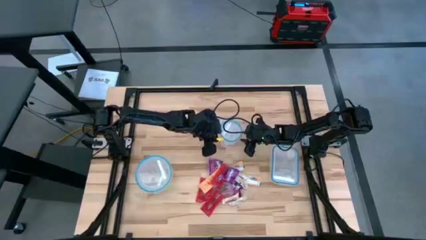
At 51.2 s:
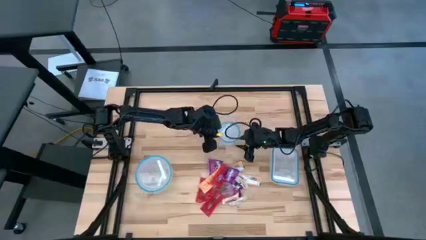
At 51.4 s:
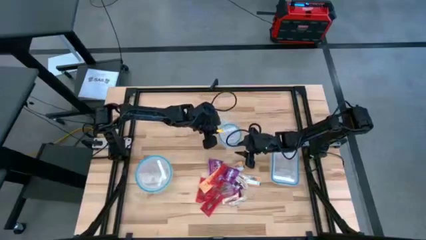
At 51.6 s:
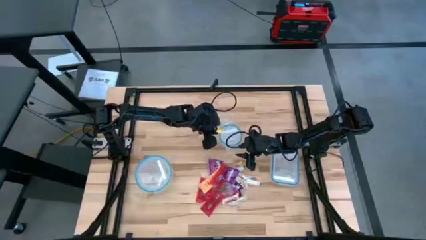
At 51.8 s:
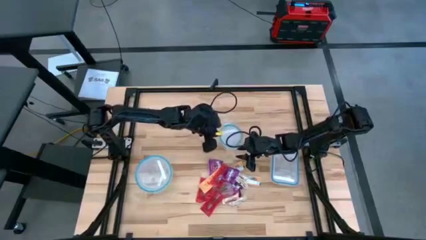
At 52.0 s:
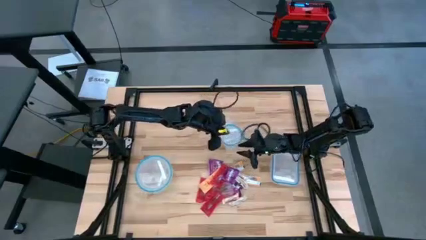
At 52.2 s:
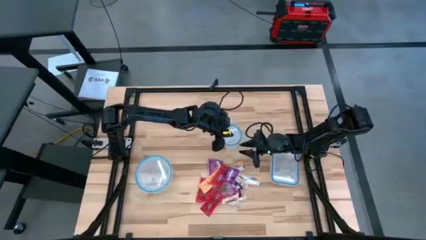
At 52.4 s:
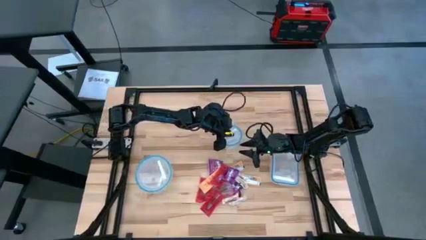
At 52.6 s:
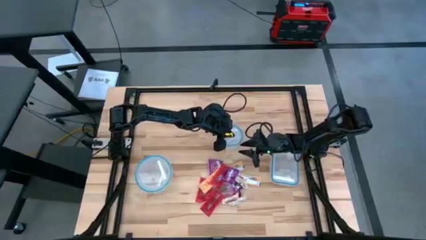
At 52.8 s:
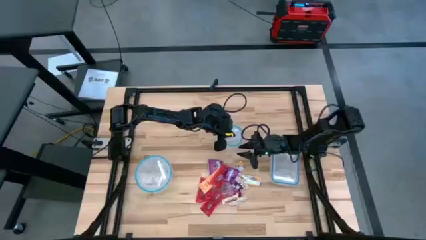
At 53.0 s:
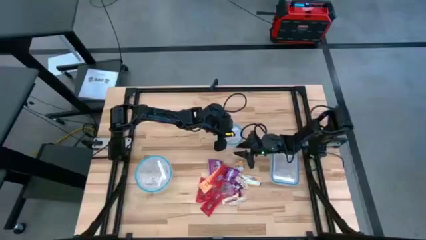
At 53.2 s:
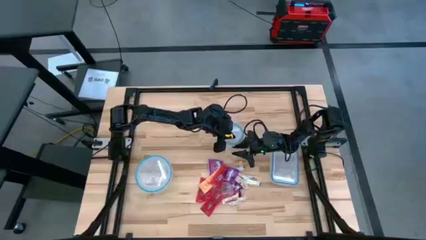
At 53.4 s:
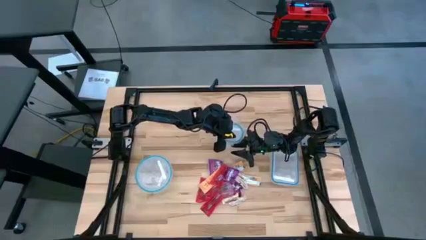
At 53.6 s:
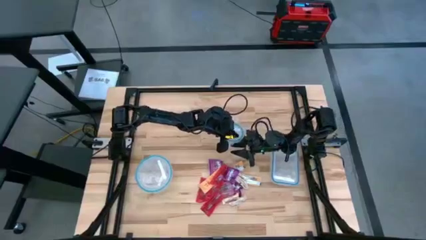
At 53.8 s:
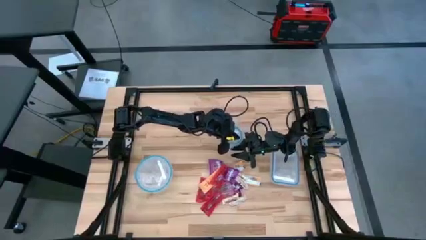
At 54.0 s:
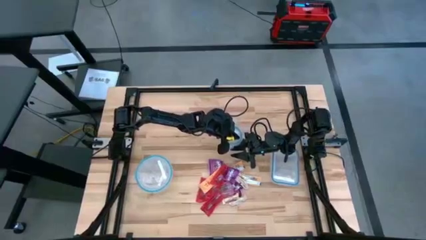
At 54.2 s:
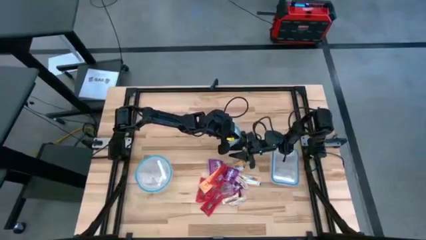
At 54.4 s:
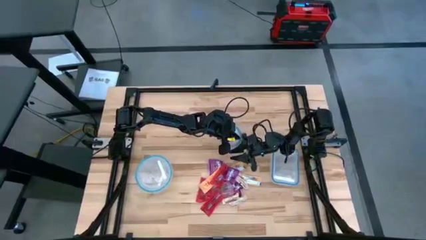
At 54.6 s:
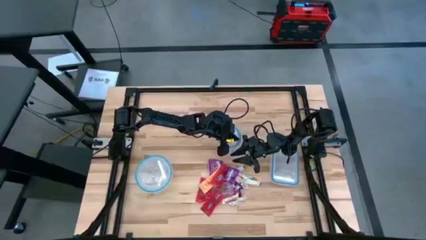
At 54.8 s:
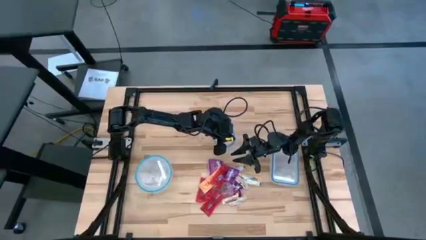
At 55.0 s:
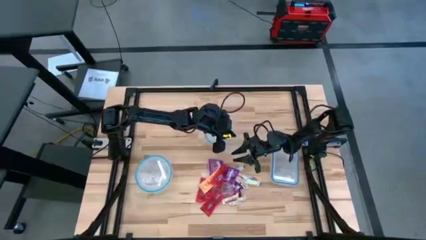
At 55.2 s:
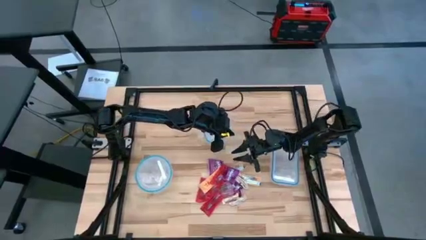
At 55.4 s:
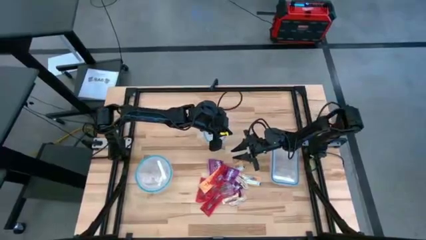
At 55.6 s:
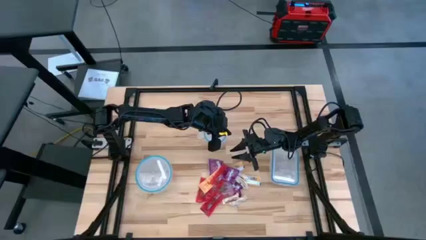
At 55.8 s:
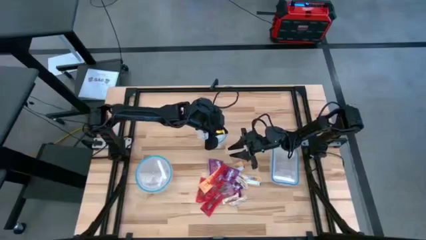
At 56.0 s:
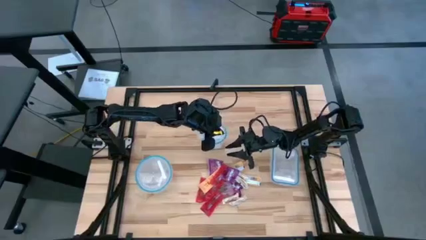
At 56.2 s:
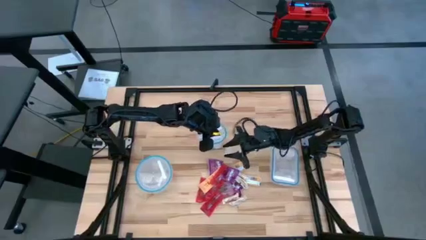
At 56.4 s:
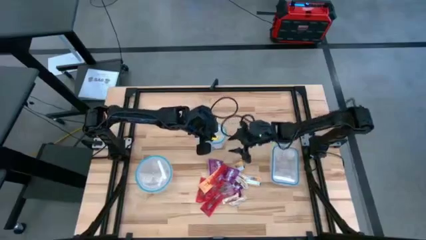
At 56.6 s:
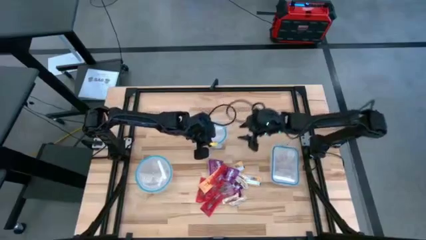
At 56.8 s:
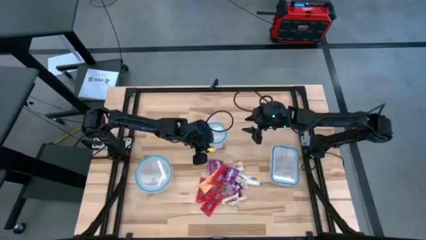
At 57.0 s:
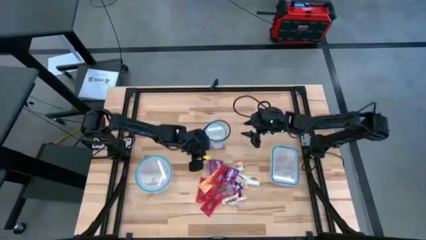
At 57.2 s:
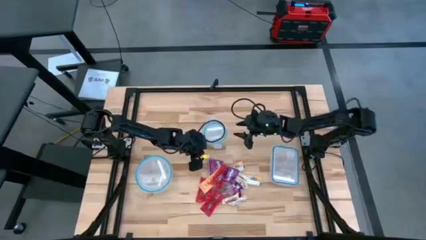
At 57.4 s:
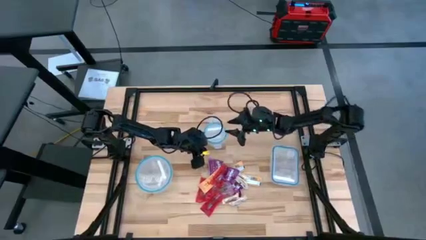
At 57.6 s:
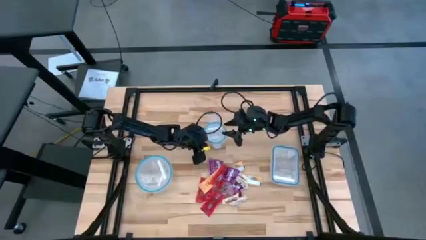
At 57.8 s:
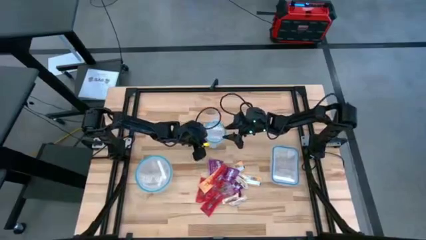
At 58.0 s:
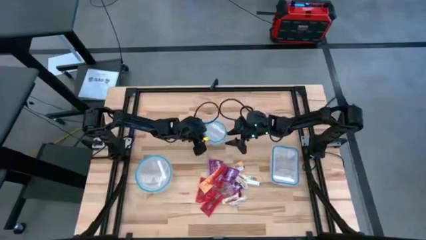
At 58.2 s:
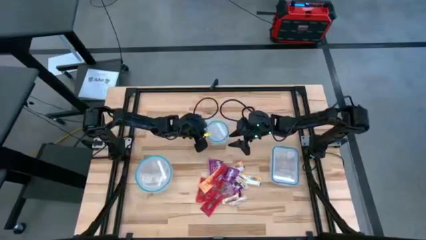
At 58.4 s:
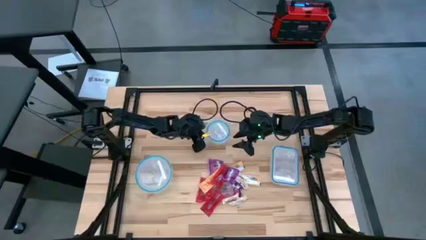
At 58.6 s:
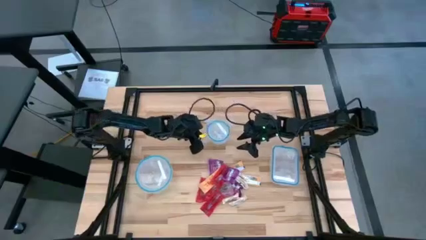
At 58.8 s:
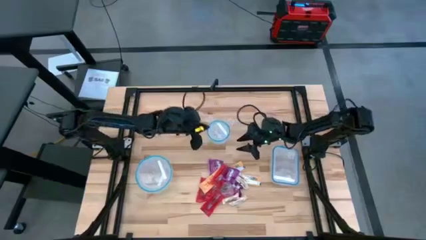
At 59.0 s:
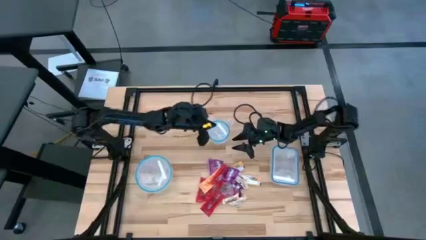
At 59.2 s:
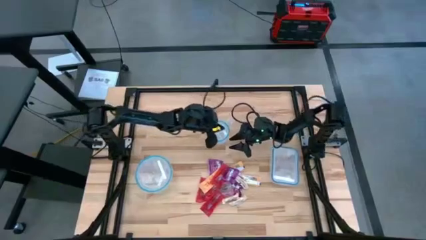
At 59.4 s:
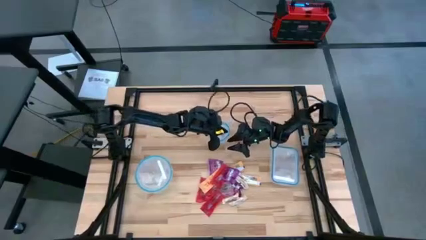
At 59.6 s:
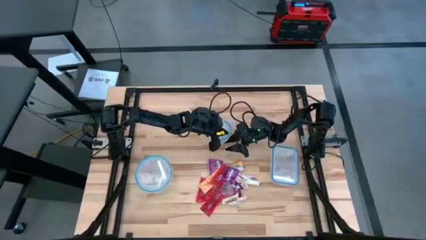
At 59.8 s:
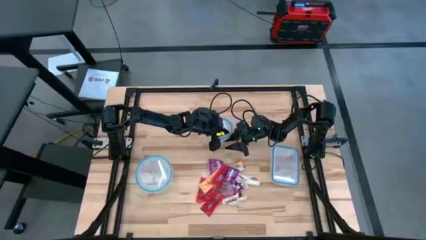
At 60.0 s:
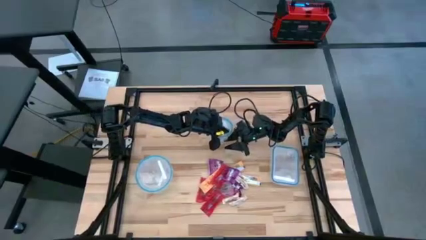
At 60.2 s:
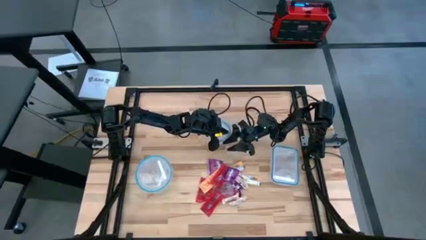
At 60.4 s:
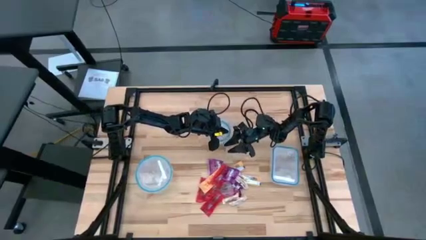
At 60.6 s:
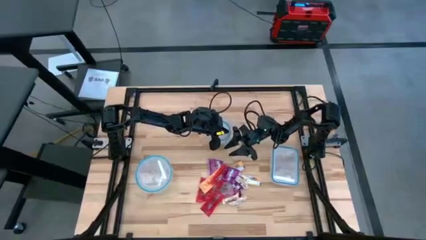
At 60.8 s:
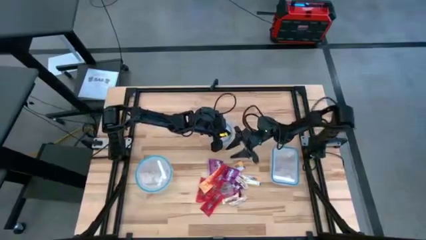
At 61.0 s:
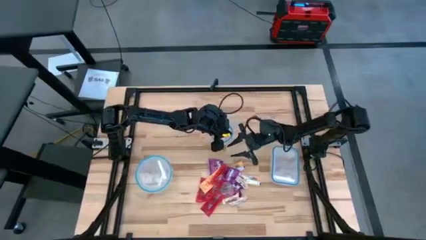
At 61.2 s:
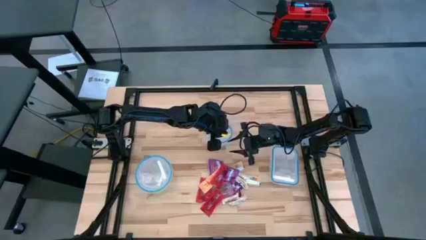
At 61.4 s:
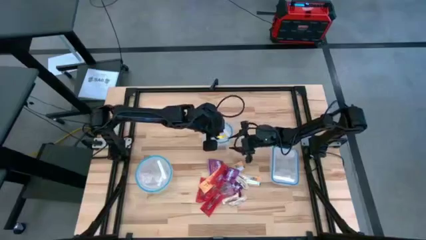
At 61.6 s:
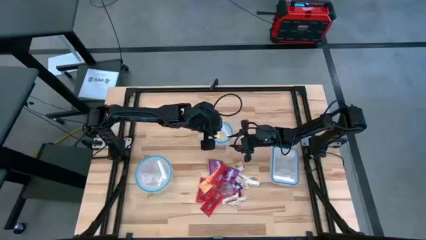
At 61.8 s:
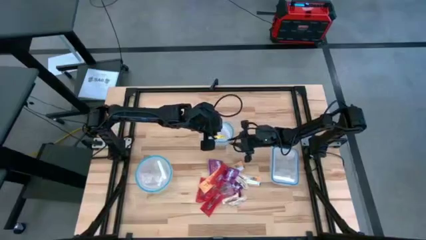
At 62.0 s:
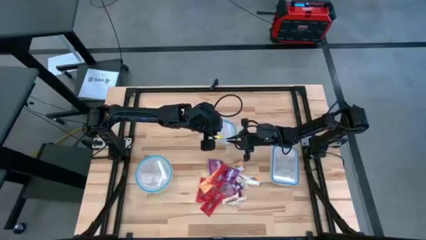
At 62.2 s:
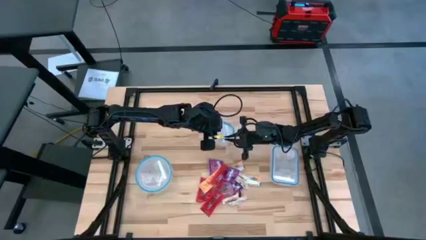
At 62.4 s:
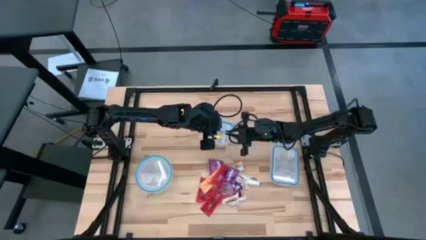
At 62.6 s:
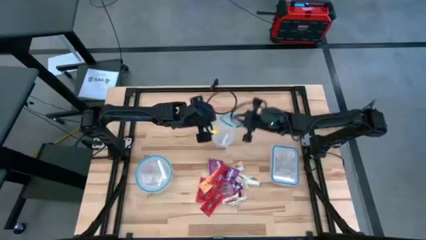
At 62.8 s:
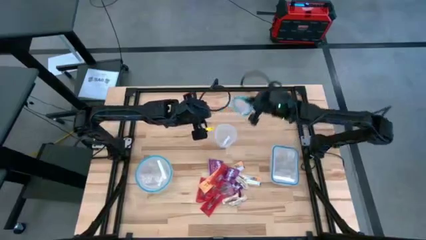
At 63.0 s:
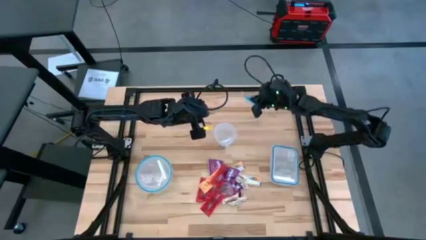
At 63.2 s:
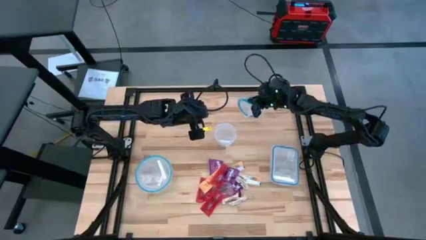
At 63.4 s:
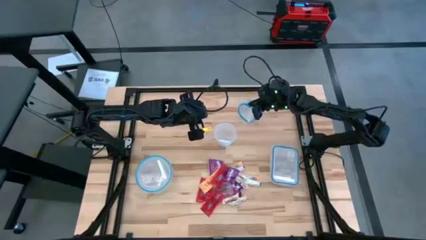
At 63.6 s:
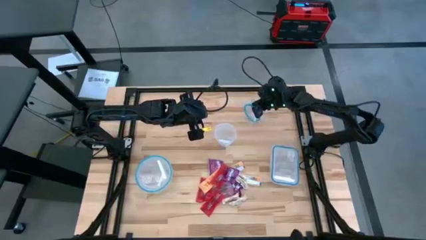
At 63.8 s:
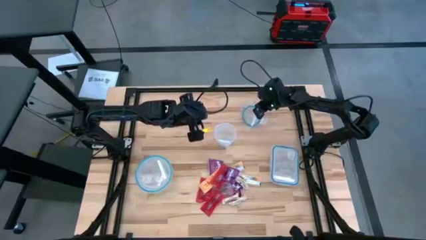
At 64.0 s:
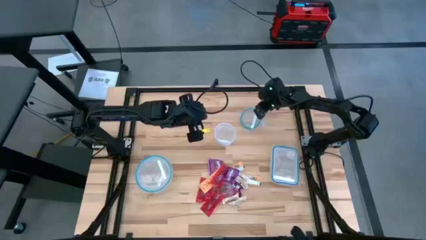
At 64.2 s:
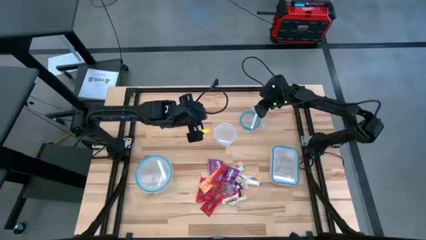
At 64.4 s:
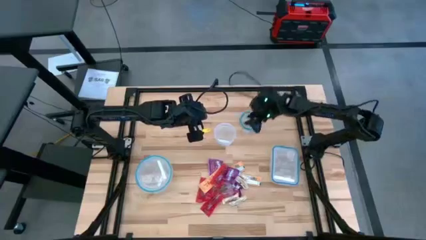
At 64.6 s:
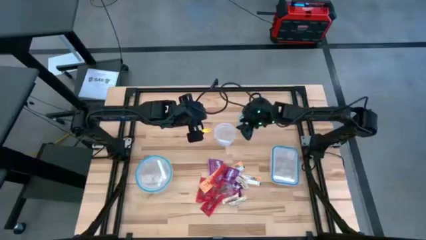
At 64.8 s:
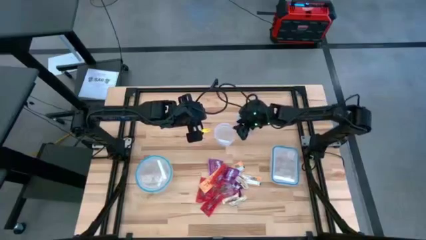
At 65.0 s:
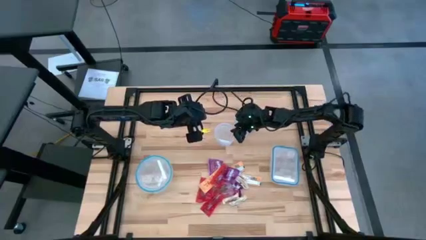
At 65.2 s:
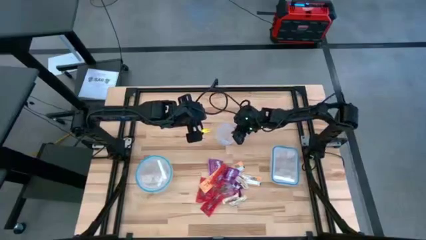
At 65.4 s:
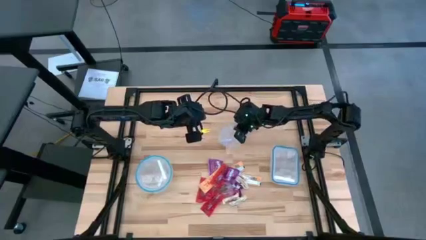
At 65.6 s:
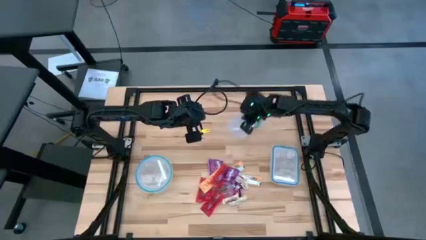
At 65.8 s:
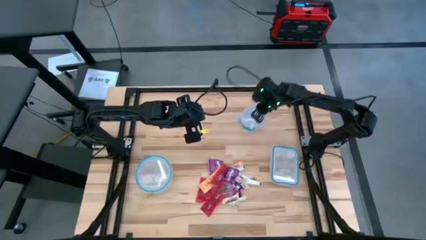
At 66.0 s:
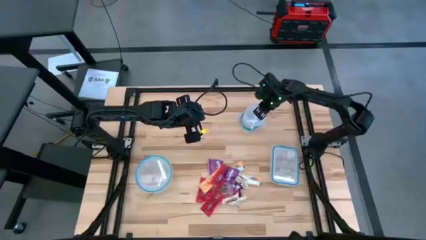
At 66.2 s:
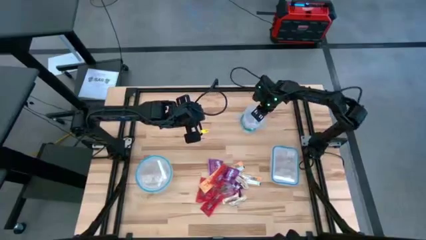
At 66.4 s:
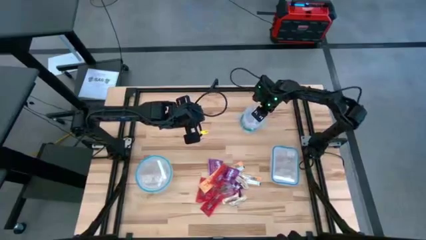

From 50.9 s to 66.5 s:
Task: Sort candy
Open the small circular transparent bin
